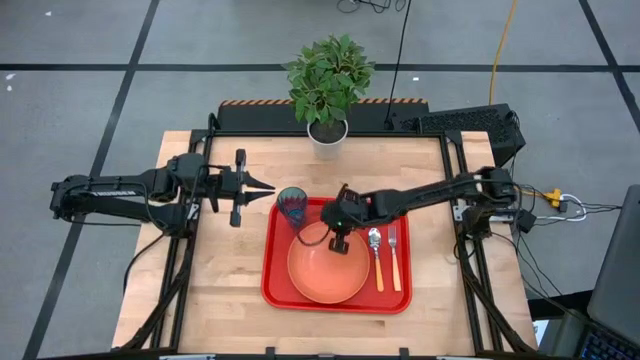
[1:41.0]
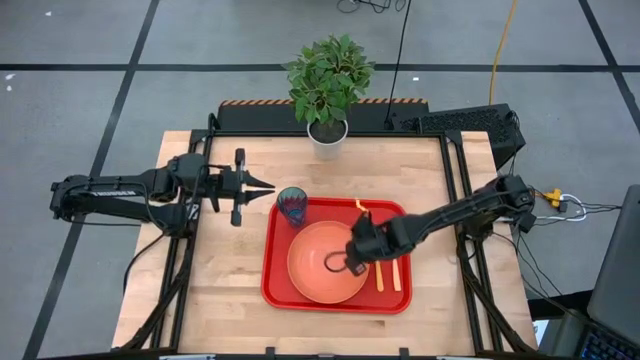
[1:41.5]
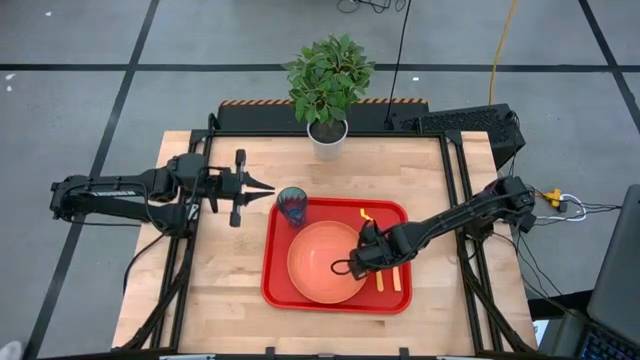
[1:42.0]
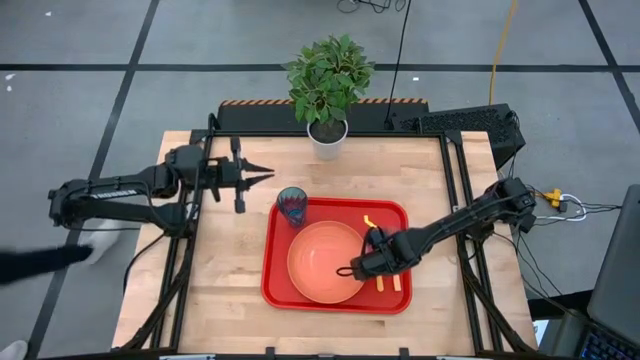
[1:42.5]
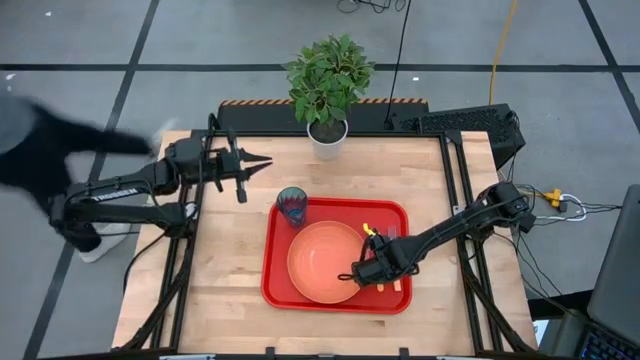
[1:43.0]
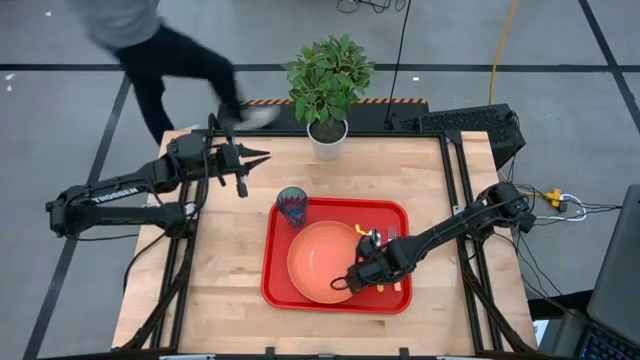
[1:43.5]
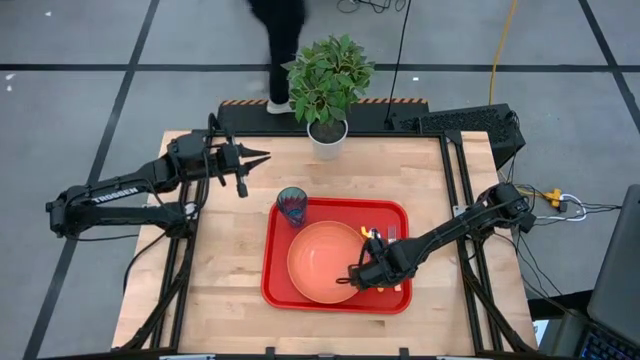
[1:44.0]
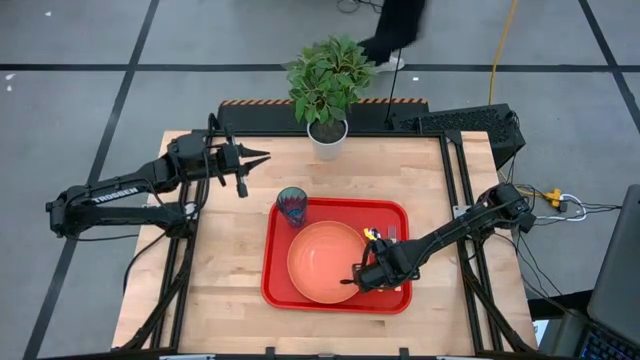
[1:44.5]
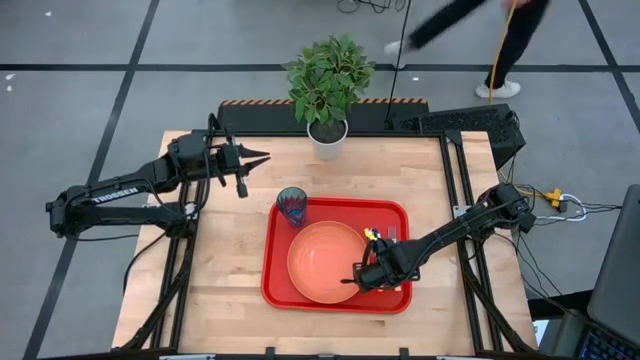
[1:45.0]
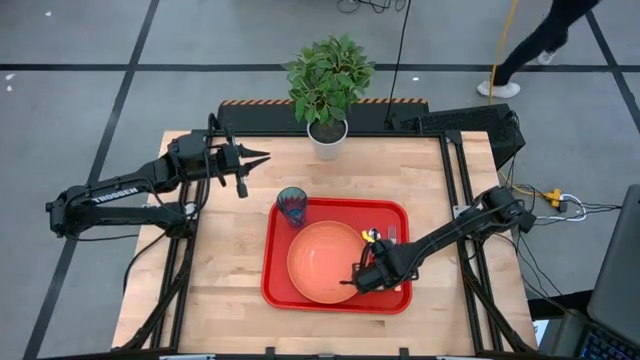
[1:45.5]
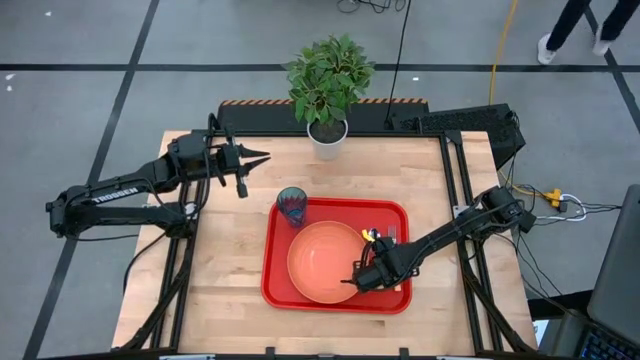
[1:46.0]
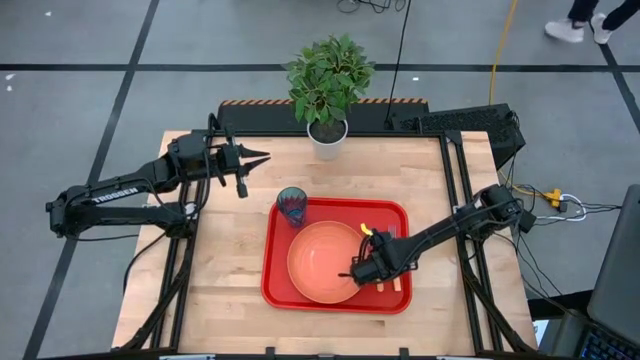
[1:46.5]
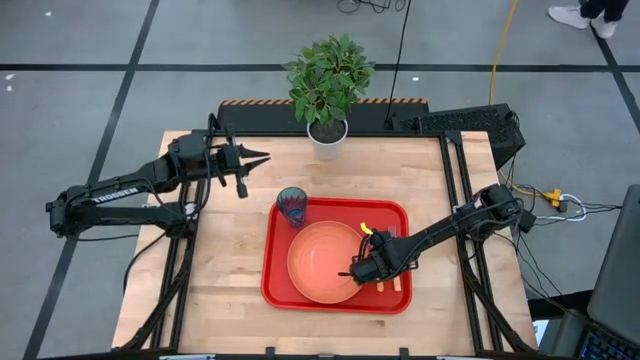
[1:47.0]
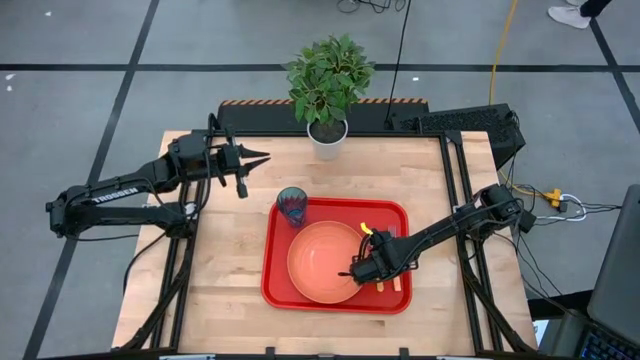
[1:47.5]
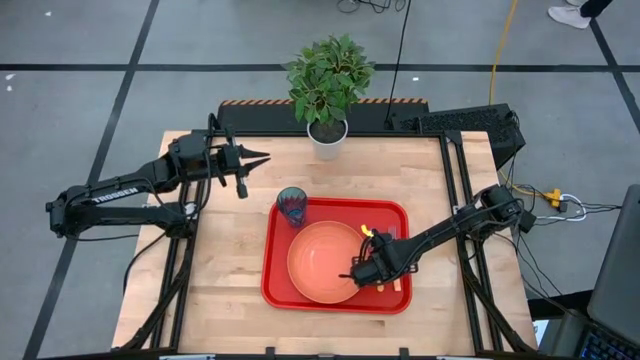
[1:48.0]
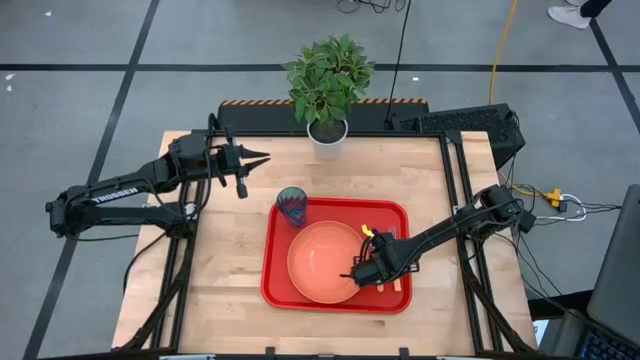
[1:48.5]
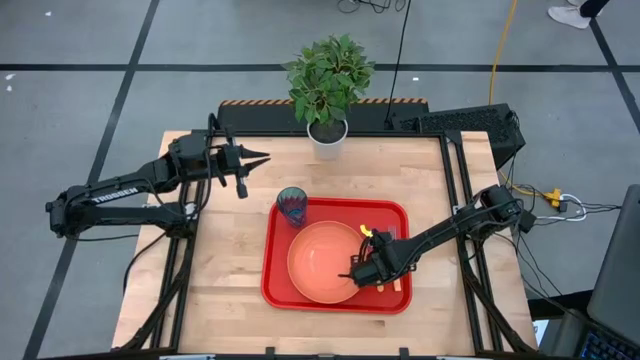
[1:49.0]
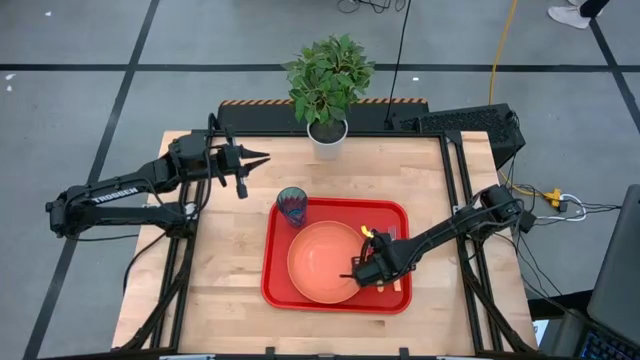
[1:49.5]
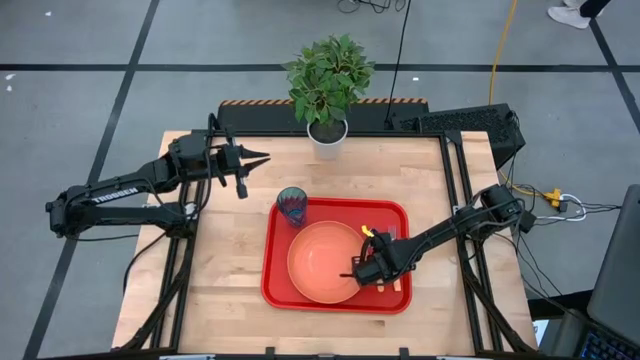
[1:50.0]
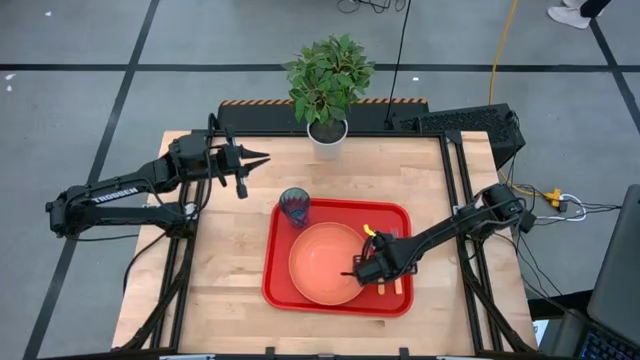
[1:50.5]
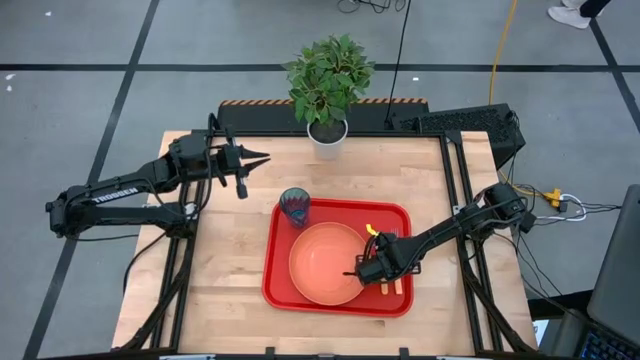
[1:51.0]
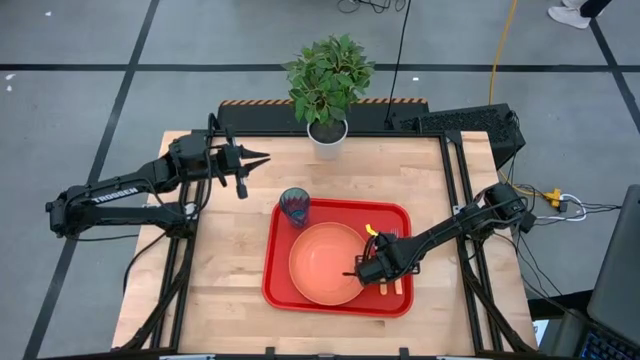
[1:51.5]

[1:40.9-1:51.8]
Task: Pick and place plate/cup/fork/spoon on tray
Adjust the yellow spoon on the red tray

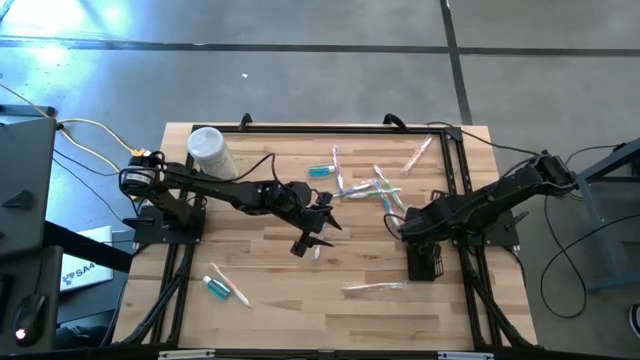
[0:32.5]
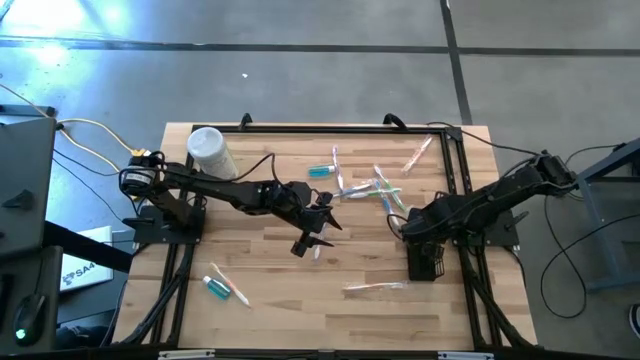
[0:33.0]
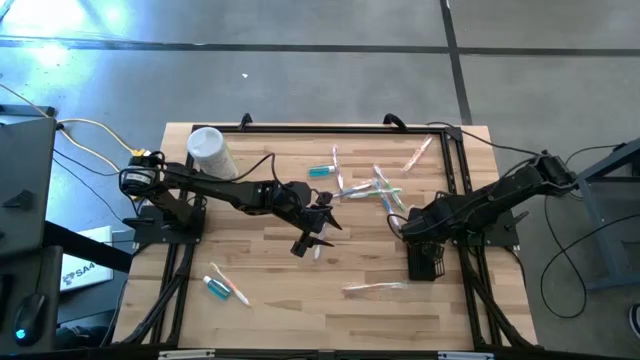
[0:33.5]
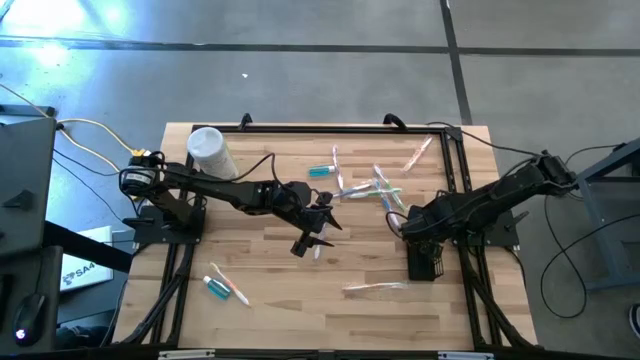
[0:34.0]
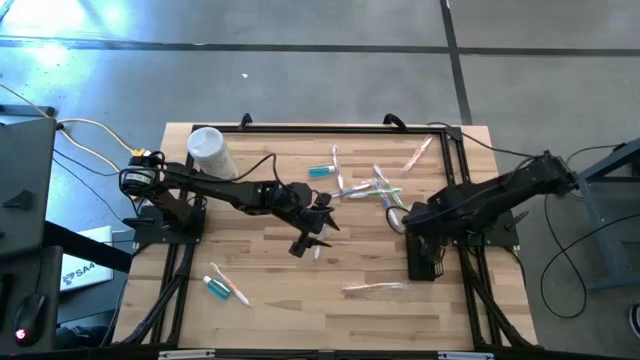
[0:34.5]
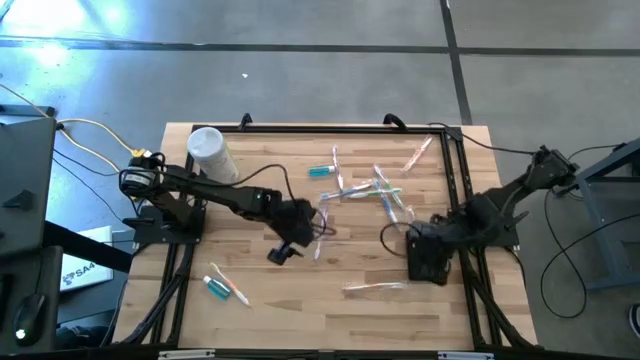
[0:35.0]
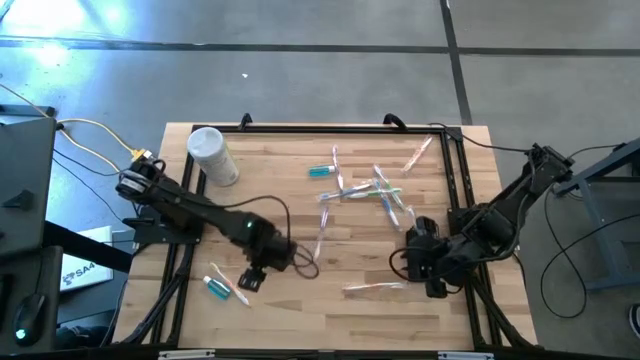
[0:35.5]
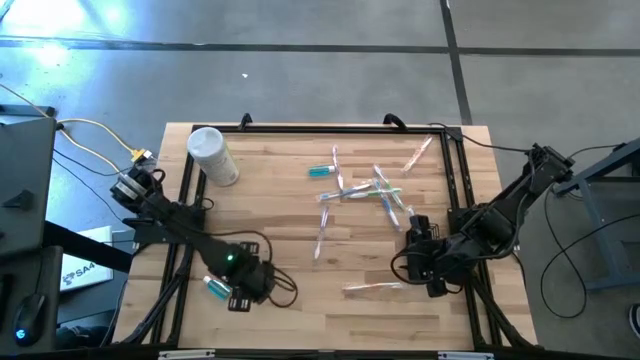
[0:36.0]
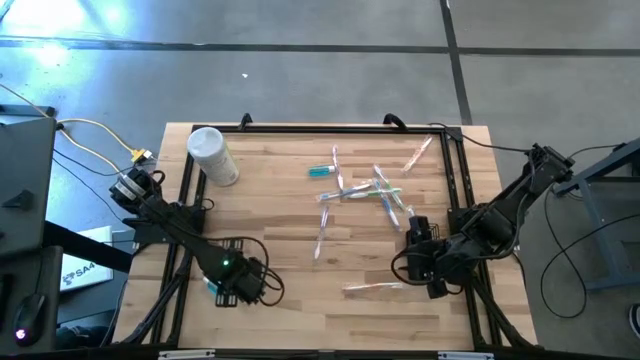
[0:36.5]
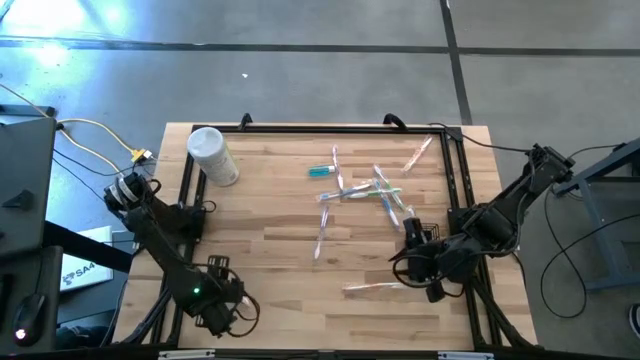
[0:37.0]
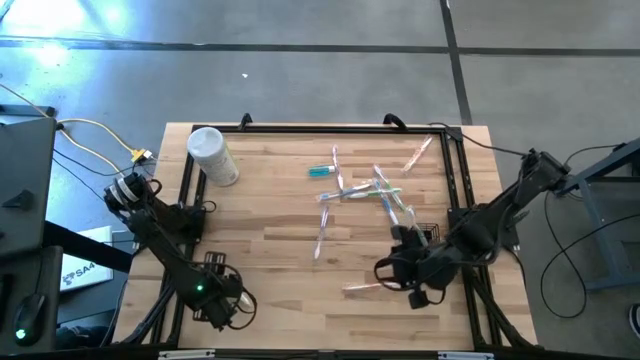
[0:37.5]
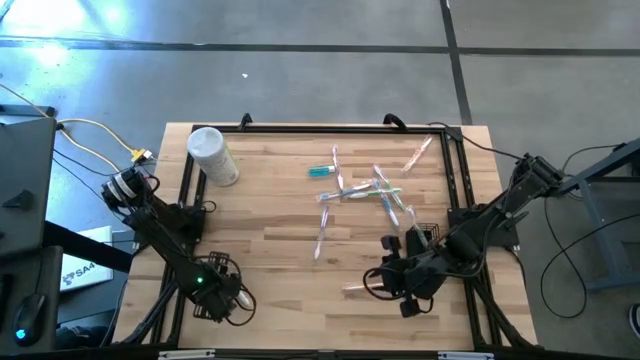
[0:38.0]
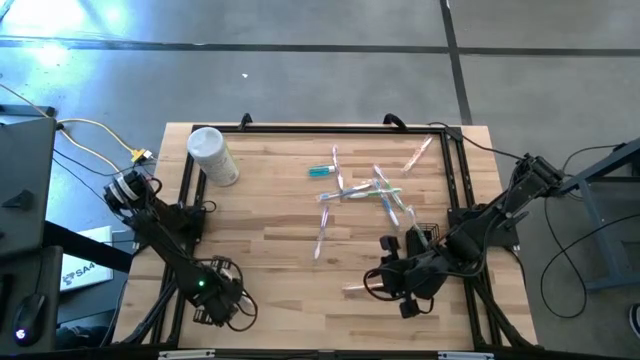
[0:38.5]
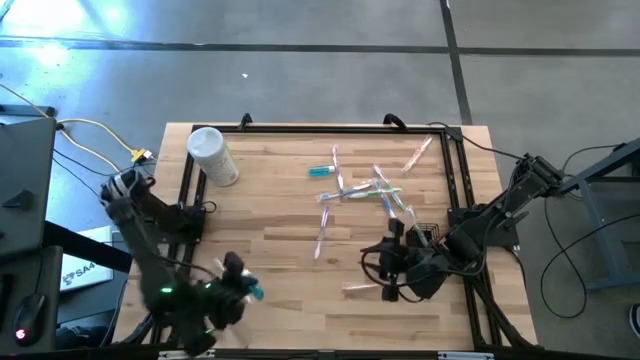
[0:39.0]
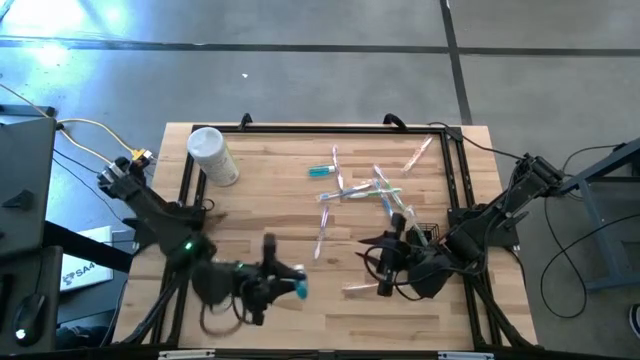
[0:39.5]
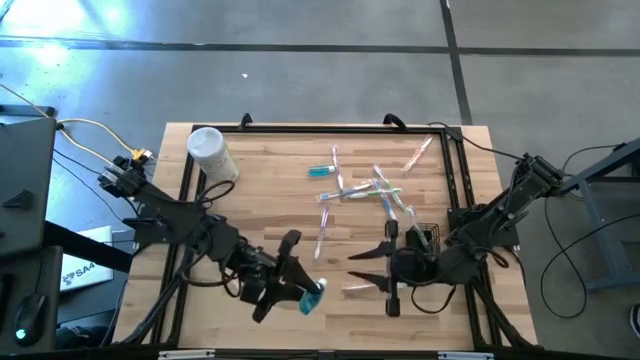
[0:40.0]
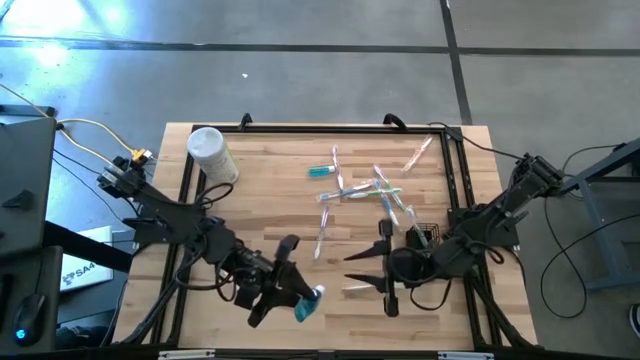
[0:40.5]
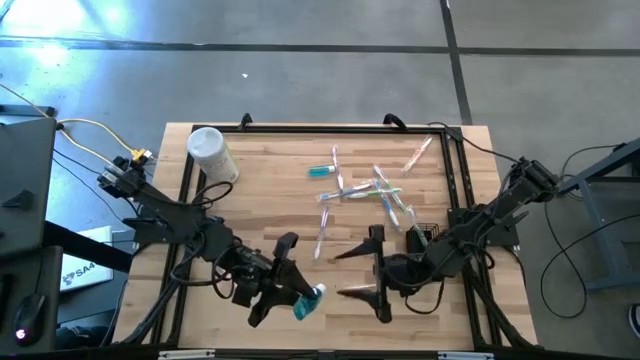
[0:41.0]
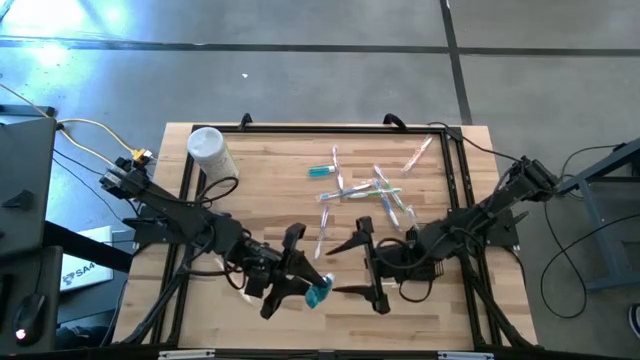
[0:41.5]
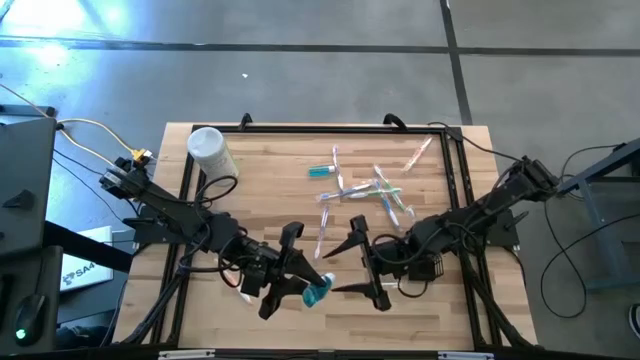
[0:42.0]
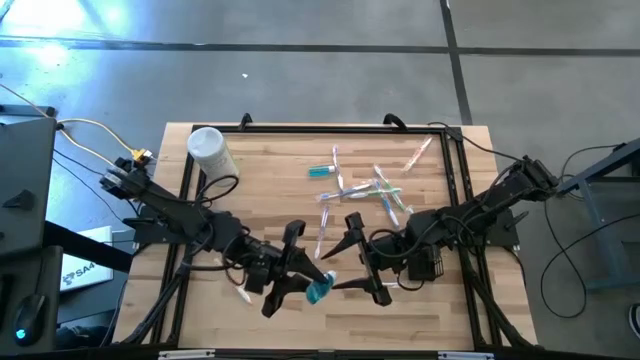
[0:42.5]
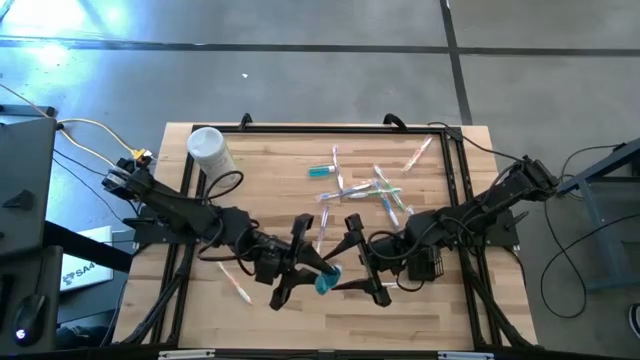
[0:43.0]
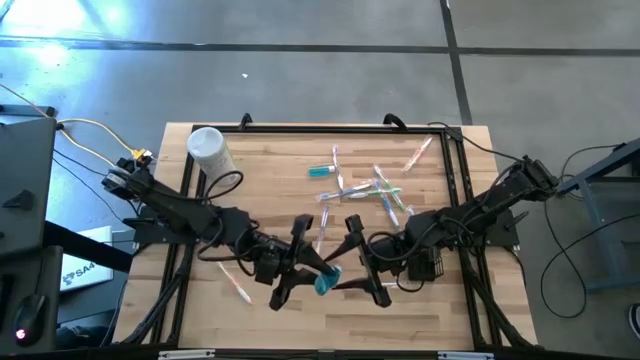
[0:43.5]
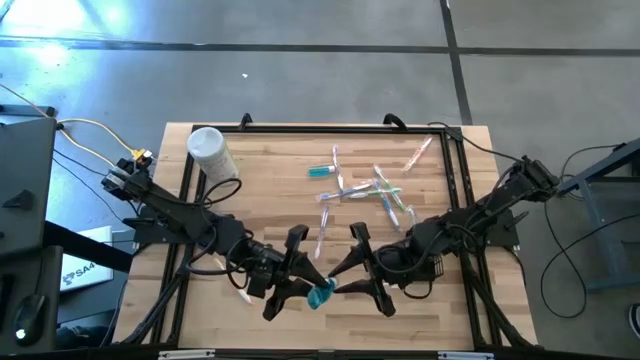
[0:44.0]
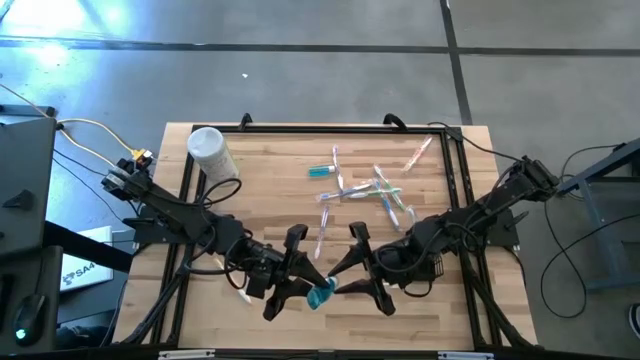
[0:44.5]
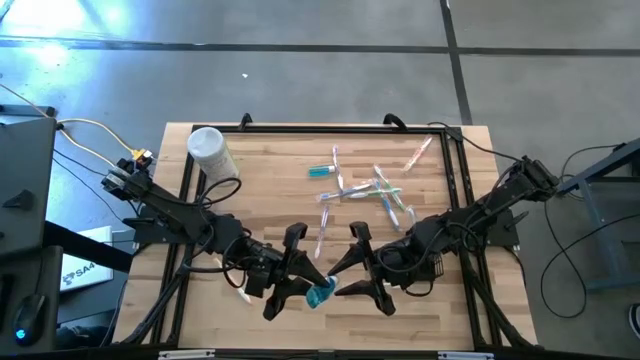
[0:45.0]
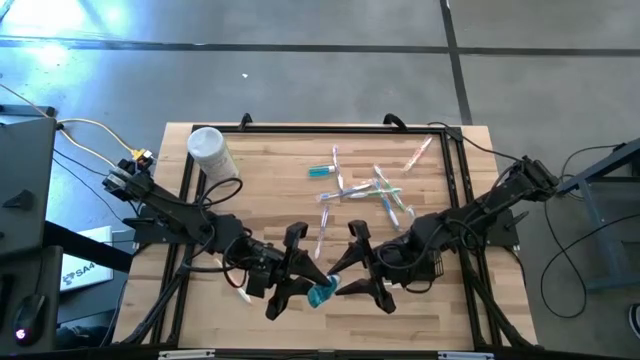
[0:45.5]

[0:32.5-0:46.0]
Task: Pick & Place toothbrushing station
Put the bottom blue mouthwash bottle into the black mesh organizer
